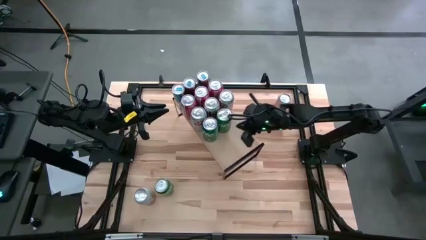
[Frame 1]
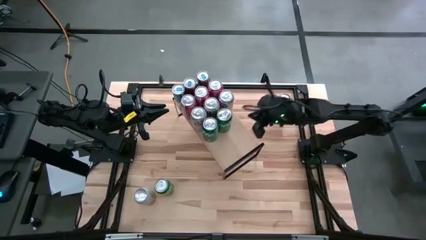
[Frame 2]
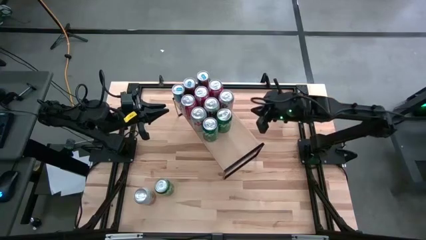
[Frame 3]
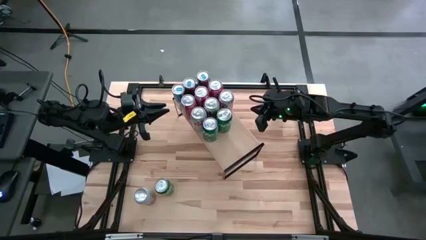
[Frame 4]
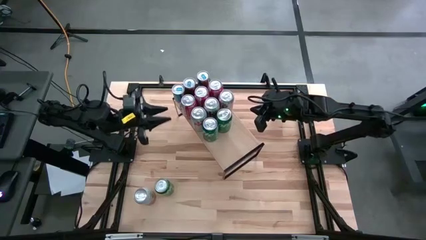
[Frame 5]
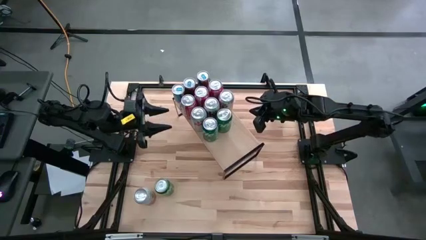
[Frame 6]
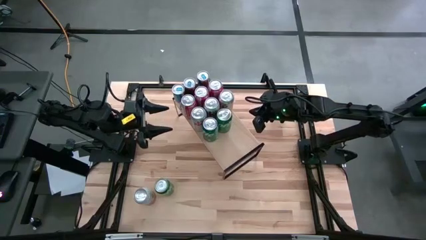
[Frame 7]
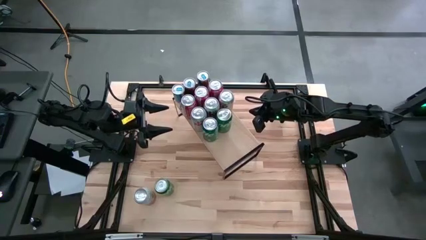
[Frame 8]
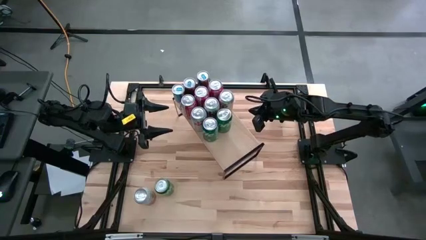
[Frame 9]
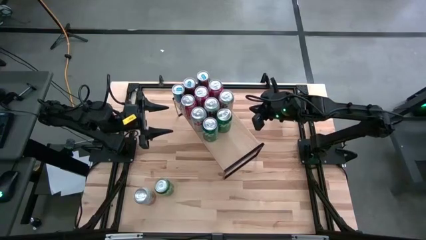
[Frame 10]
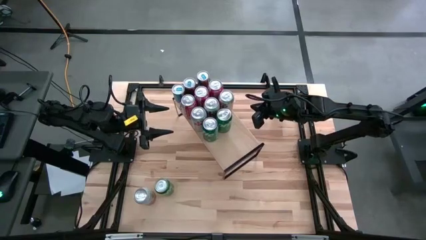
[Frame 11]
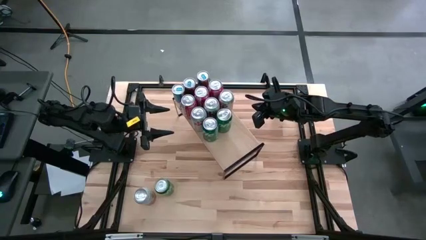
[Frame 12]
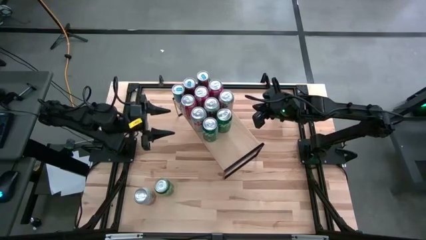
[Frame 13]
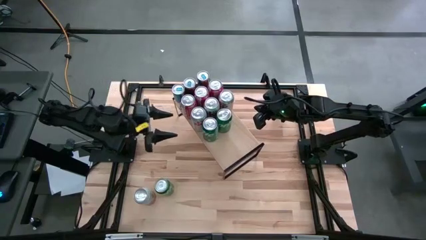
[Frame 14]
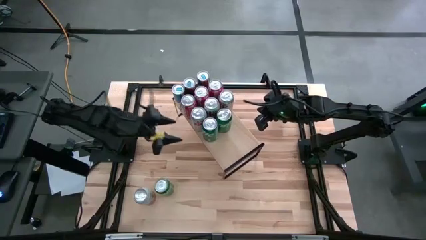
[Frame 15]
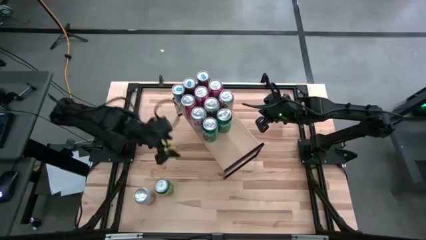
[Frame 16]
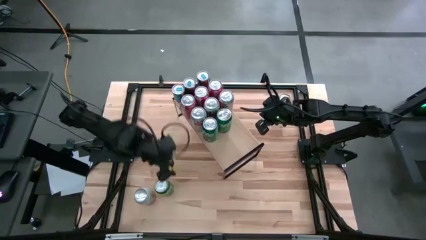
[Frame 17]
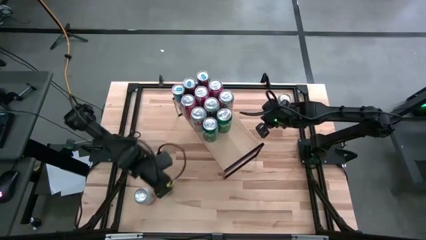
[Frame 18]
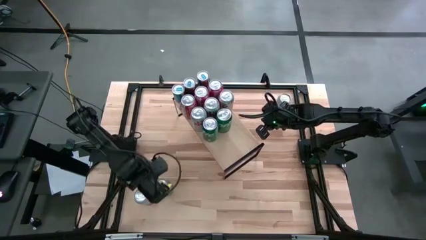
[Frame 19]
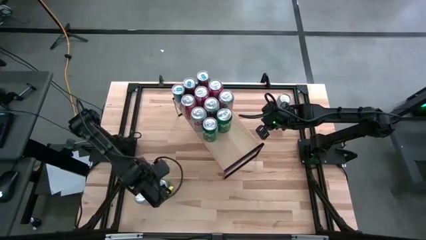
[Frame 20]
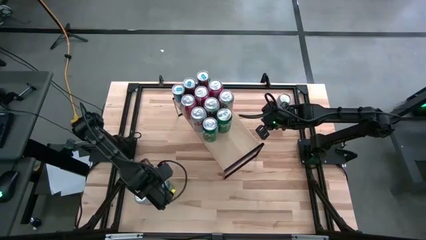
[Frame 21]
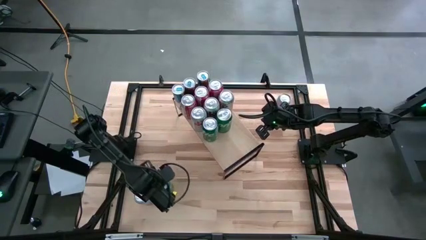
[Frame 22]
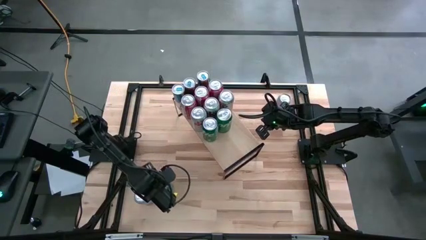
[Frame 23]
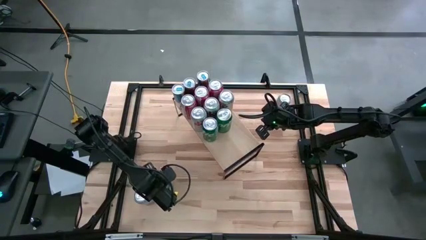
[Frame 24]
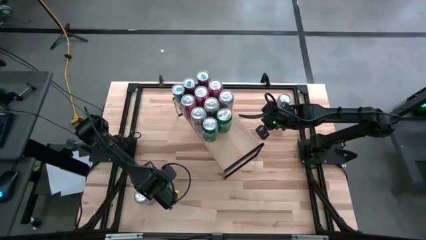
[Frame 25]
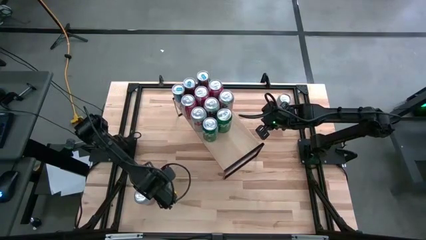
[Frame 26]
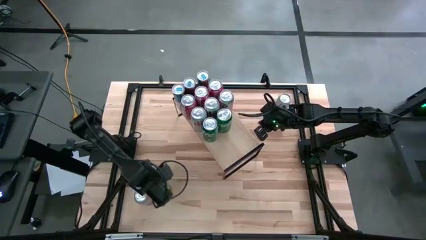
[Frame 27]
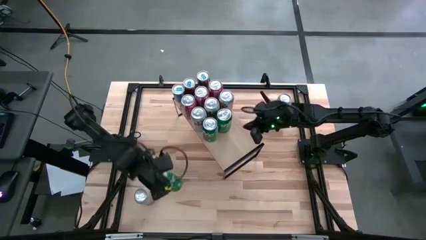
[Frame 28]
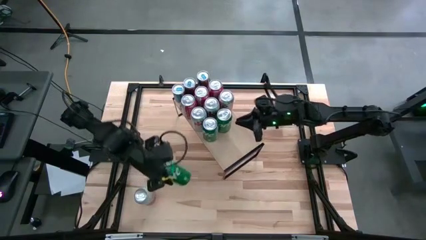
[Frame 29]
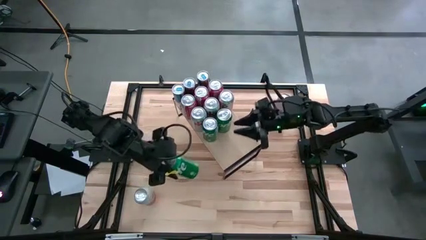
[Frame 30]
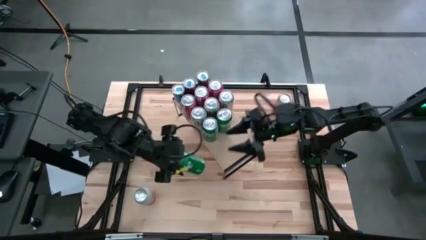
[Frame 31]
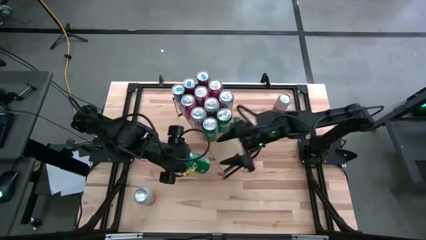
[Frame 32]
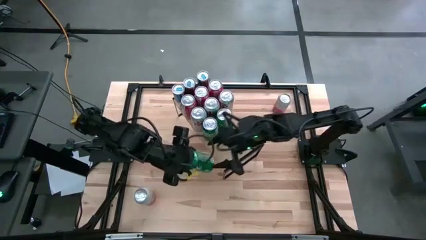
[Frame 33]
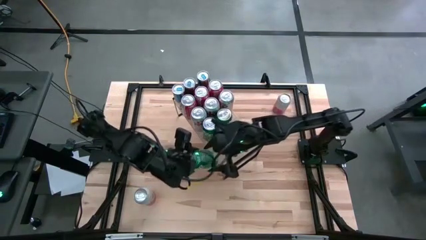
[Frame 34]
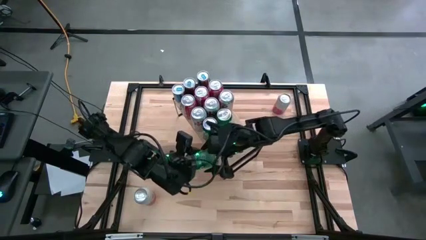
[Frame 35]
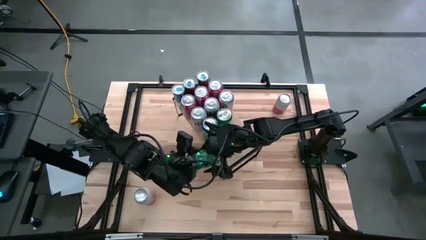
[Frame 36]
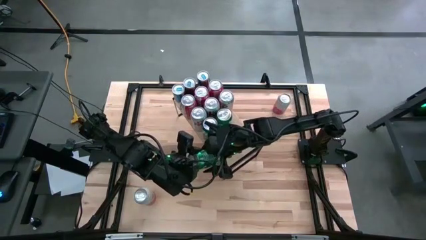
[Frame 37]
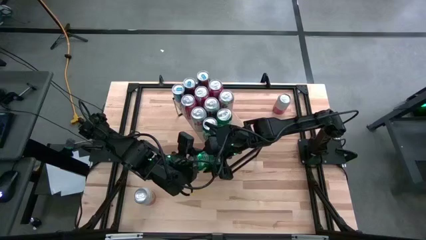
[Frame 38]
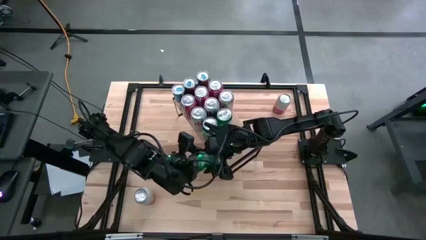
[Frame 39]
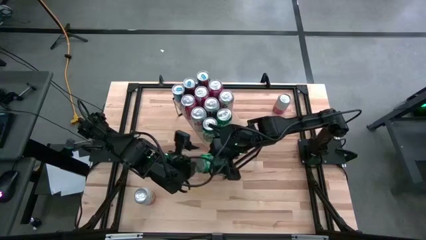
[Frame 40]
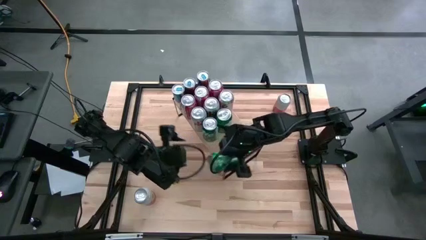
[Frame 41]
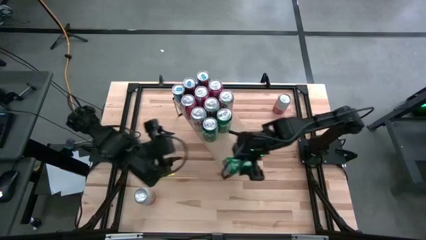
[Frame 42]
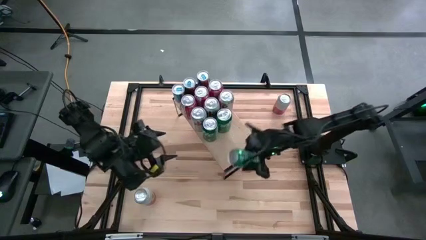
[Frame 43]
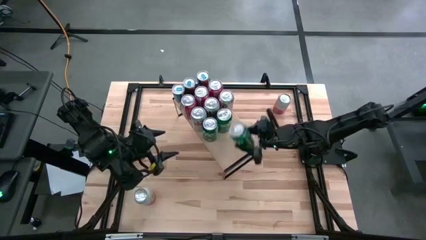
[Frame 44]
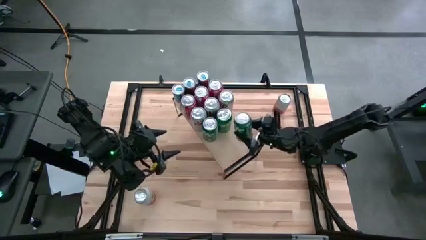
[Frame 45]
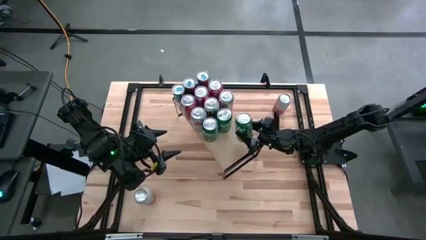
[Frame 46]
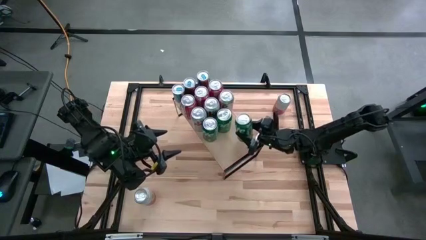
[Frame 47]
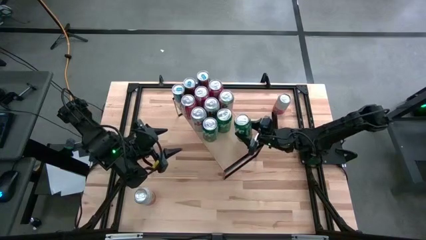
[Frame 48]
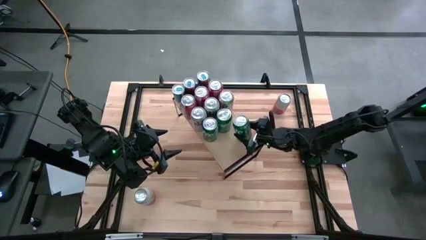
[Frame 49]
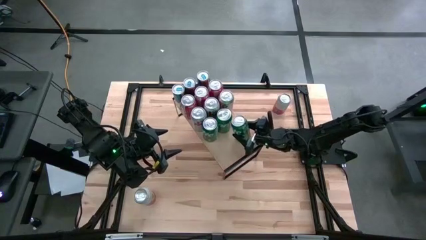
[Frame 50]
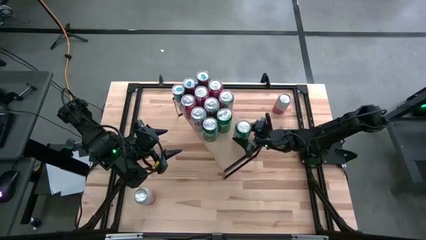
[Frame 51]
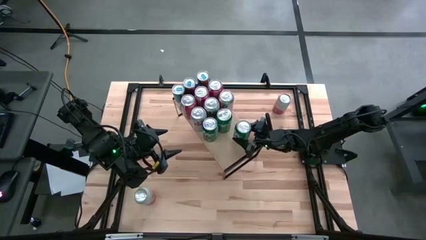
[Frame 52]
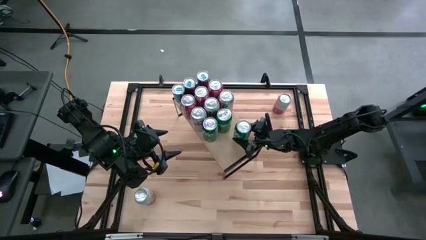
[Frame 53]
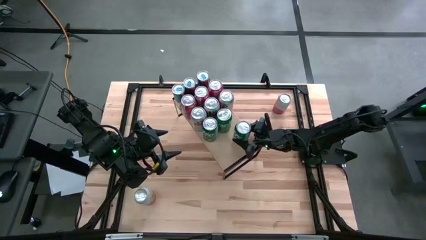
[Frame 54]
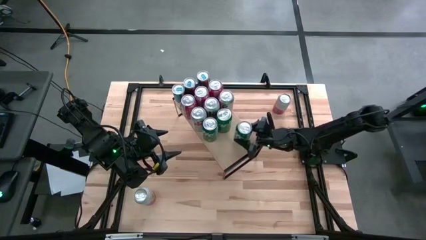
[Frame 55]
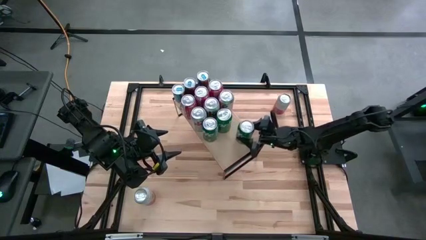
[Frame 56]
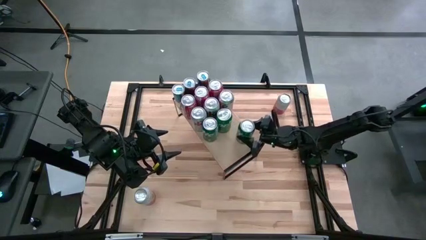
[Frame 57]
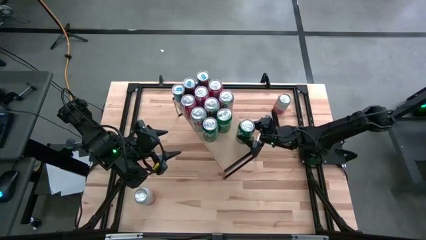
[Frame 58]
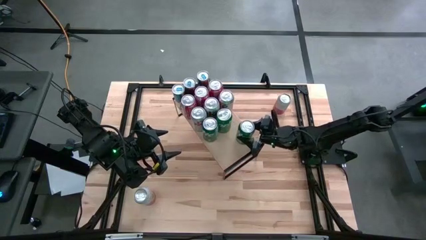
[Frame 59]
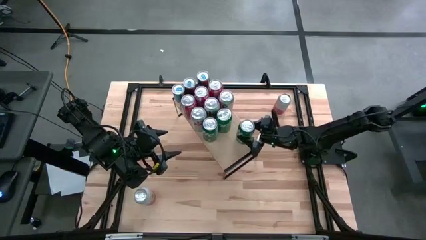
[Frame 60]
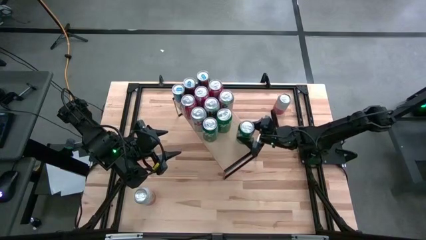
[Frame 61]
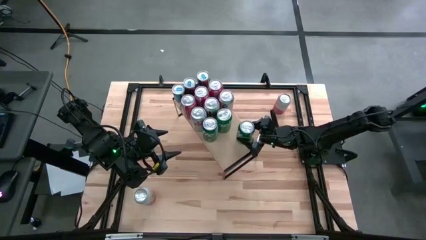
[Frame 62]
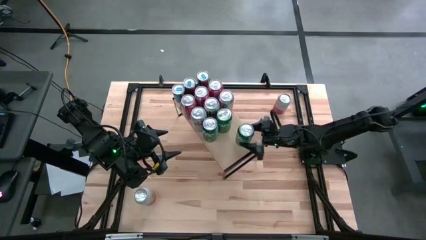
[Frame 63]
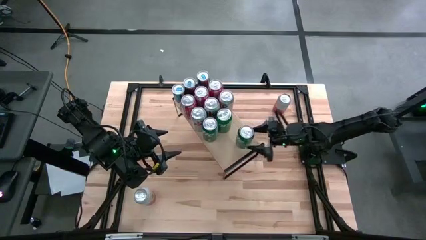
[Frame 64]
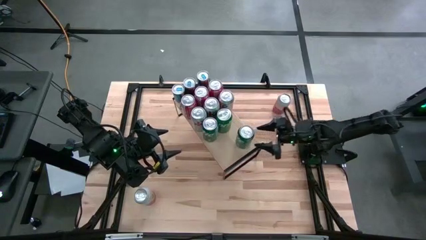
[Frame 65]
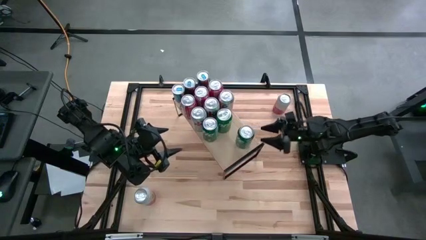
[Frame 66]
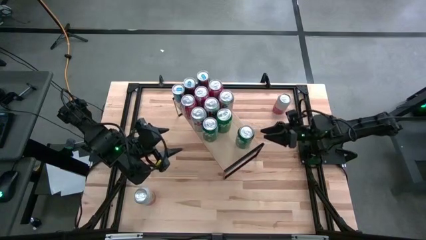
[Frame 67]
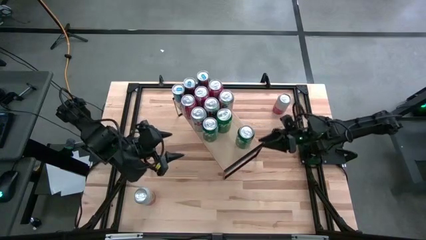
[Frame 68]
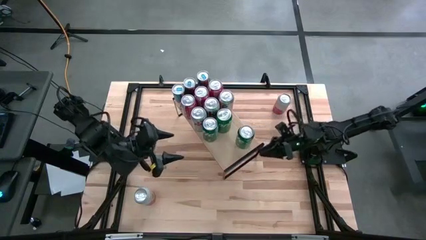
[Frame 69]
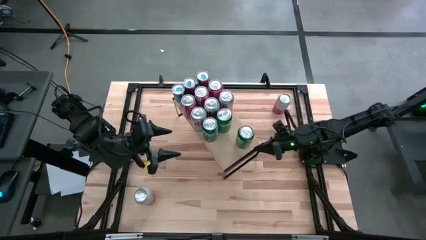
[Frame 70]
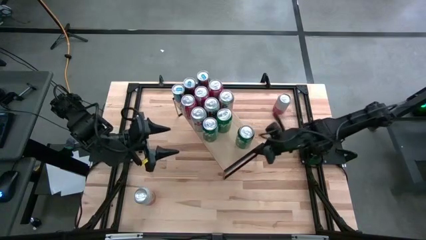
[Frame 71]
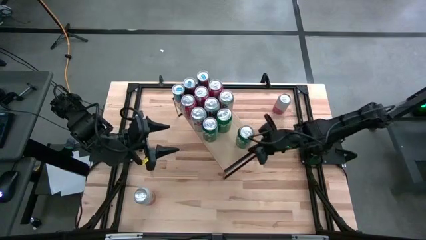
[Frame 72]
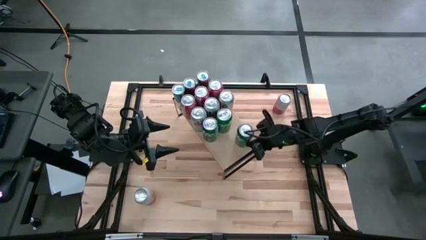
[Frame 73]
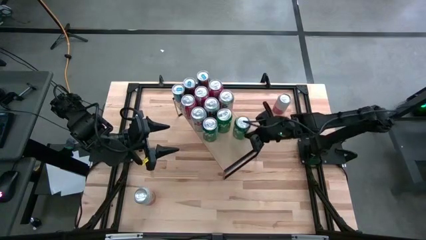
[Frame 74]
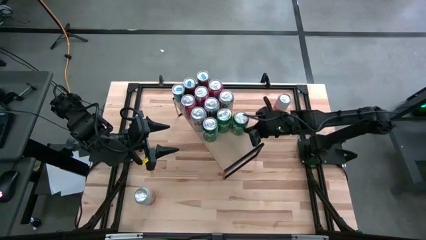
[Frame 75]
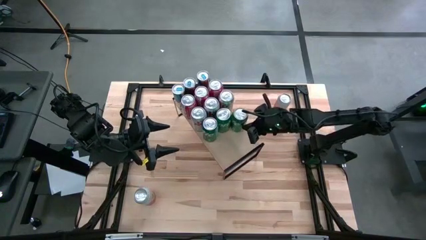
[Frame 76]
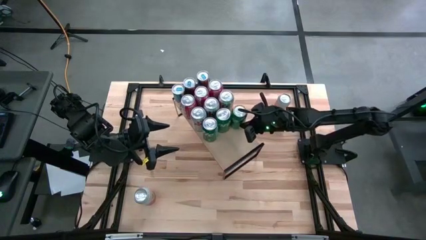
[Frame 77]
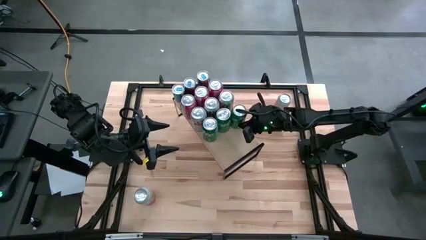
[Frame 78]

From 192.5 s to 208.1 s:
Task: Place canned beverage on shelf
Put the green soda can on the shelf aligned with the other green soda cans
